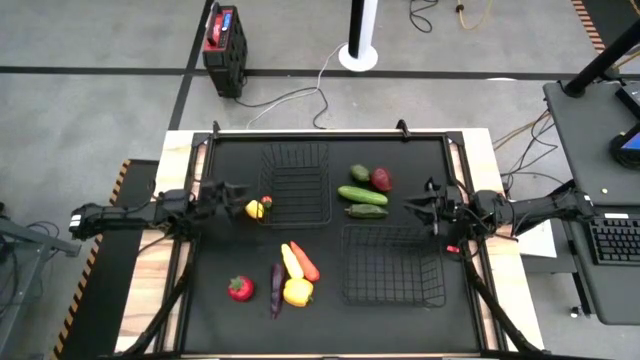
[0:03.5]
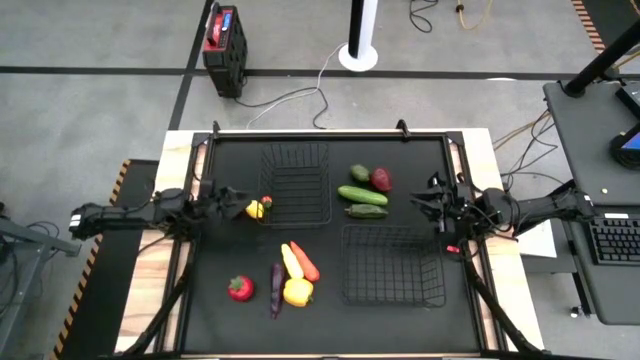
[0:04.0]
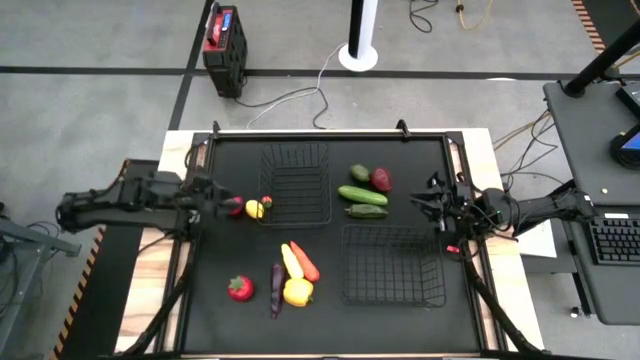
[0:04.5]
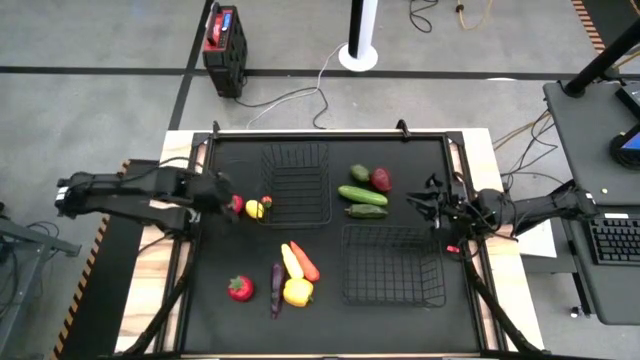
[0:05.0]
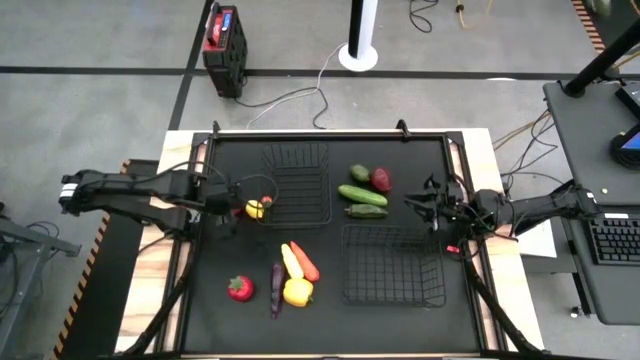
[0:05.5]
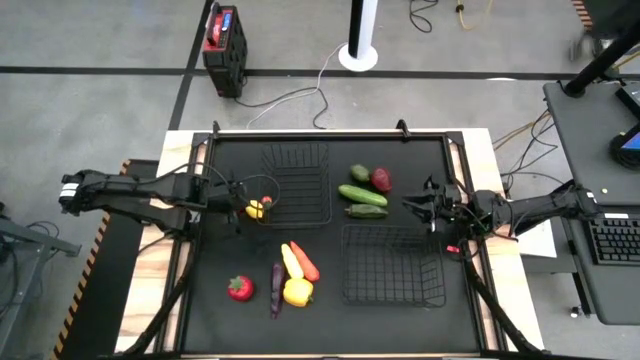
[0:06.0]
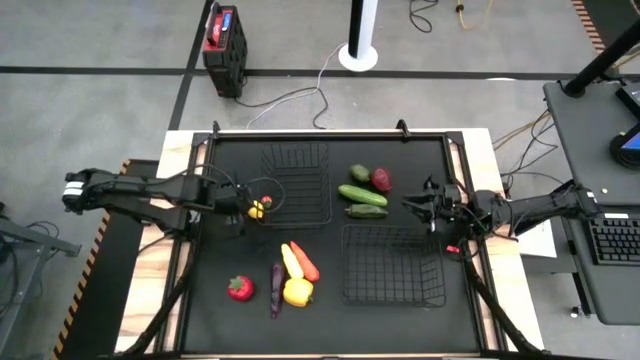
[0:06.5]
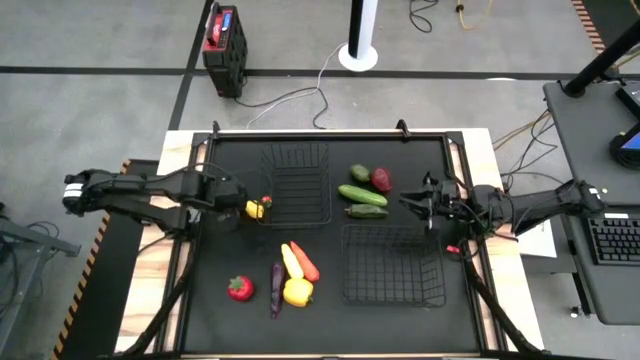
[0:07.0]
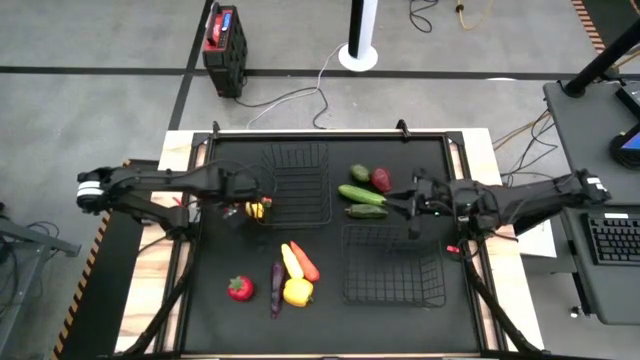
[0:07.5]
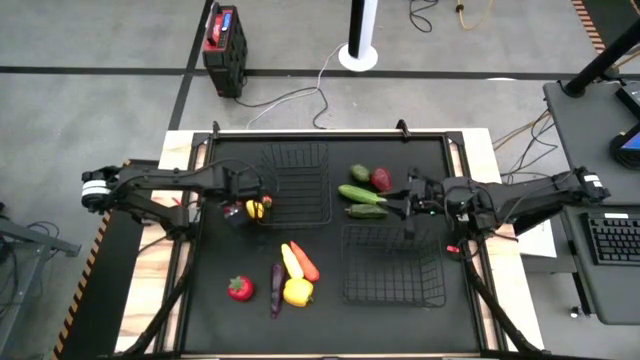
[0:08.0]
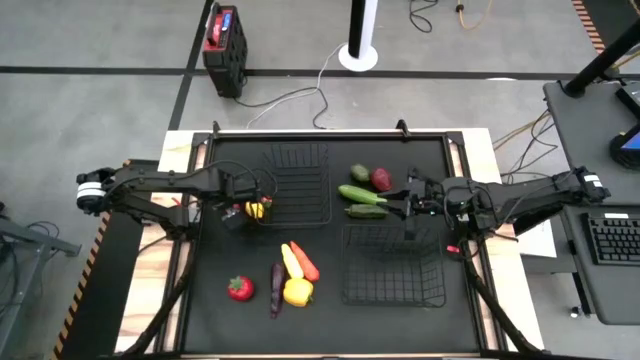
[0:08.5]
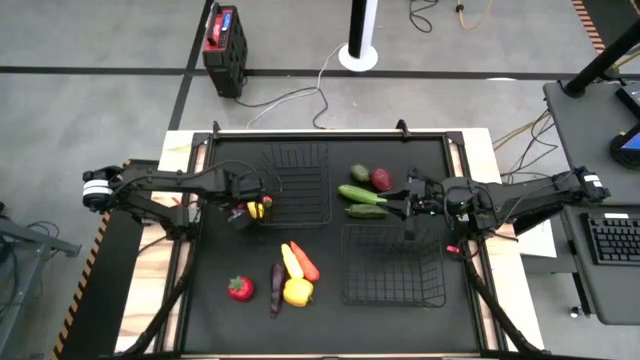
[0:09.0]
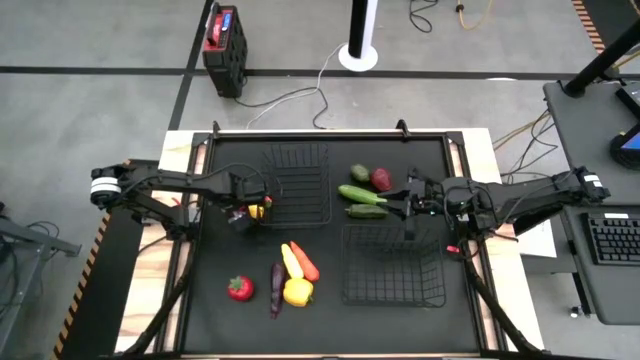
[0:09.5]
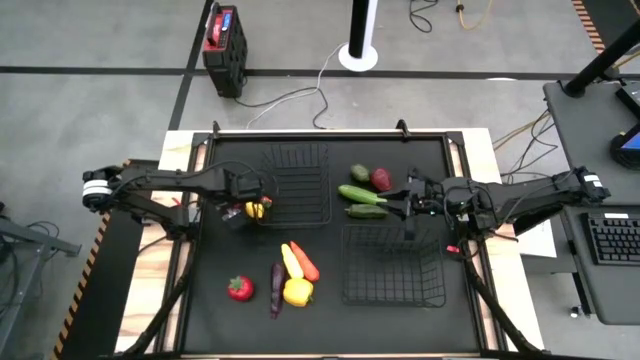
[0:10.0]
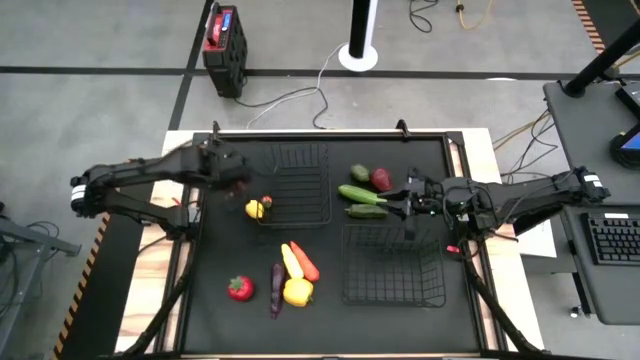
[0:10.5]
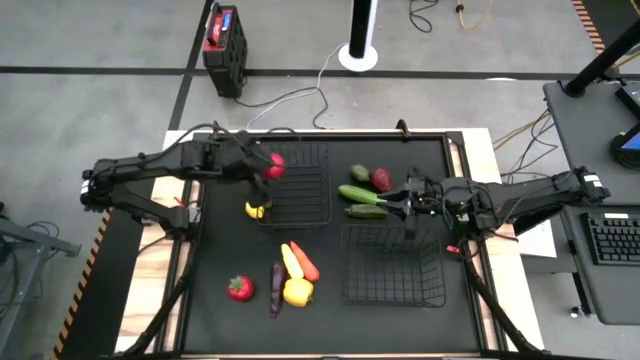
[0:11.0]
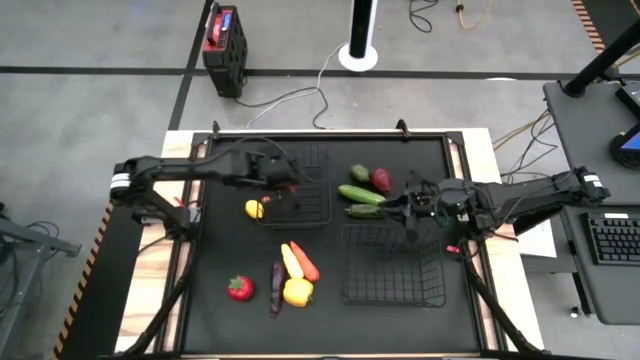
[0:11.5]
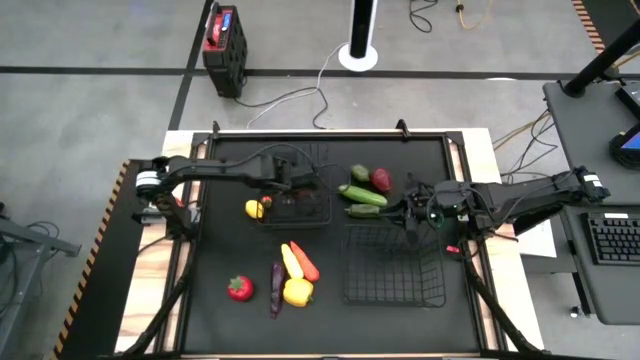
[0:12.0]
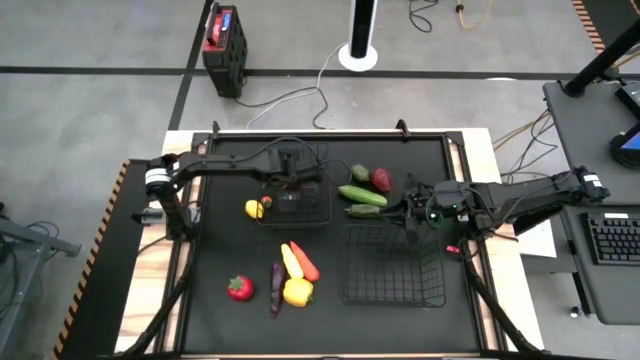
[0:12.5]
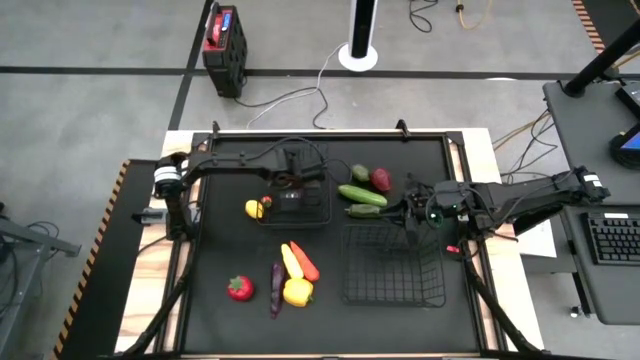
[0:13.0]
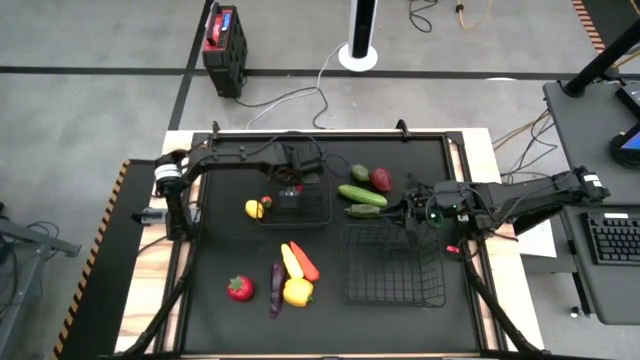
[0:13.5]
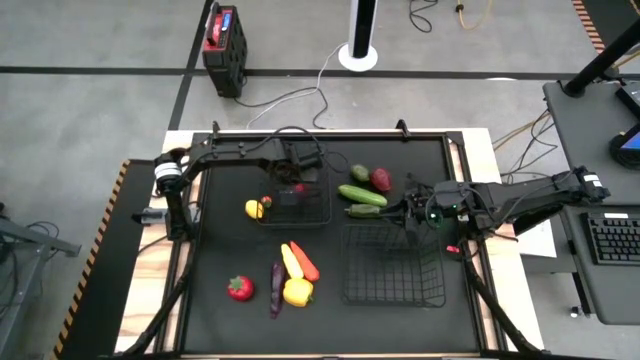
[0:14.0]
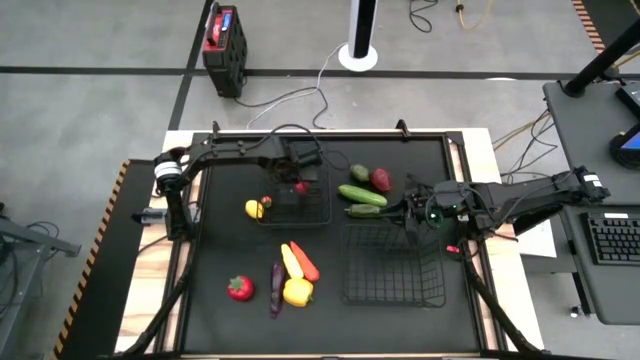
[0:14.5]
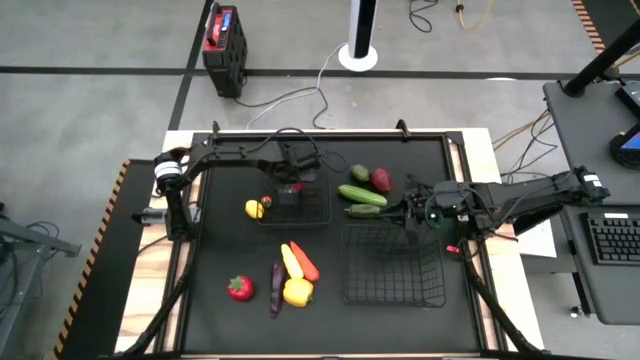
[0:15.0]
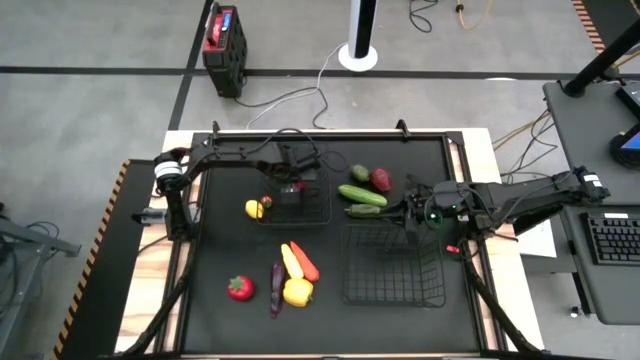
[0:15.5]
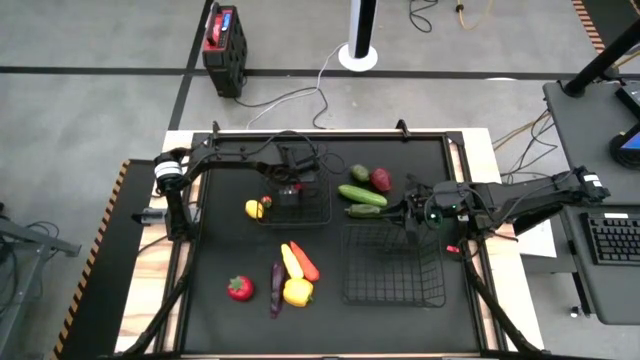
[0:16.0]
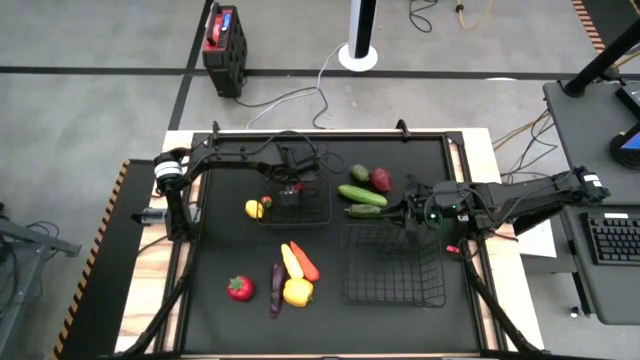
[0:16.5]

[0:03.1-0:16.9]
Task: Sort produce into baskets
Put the tomato into the top black wire basket

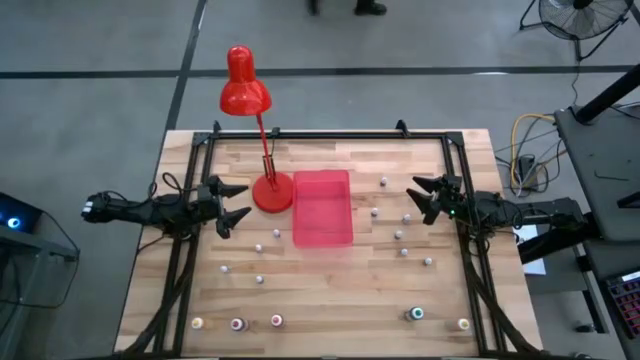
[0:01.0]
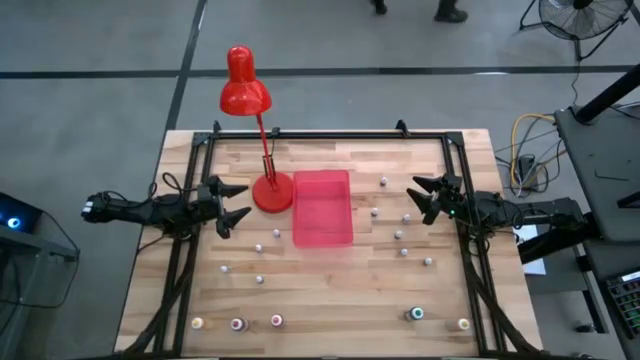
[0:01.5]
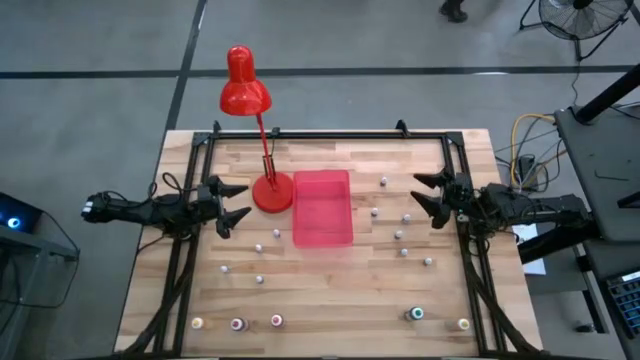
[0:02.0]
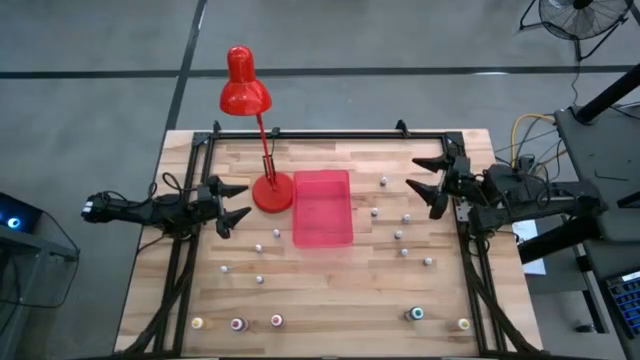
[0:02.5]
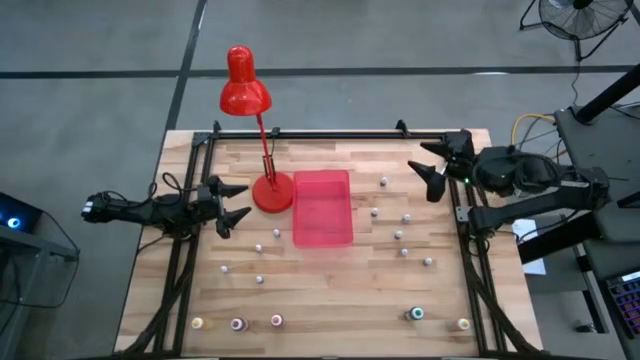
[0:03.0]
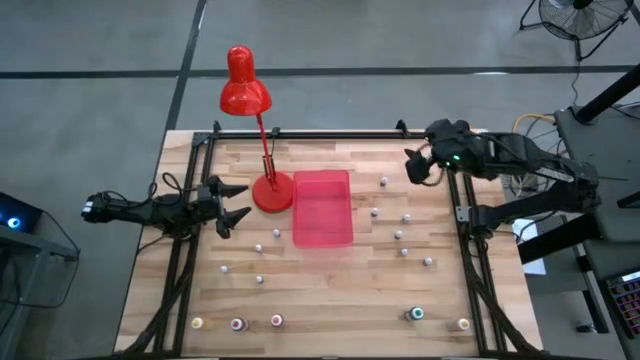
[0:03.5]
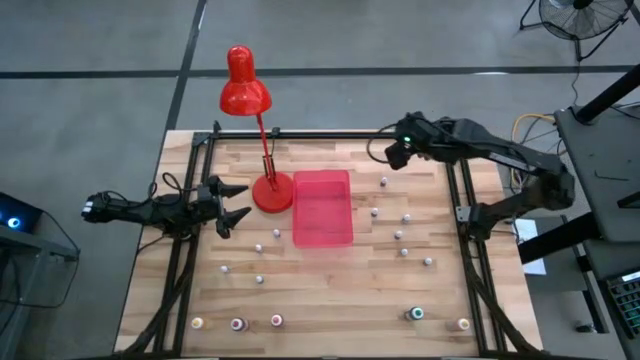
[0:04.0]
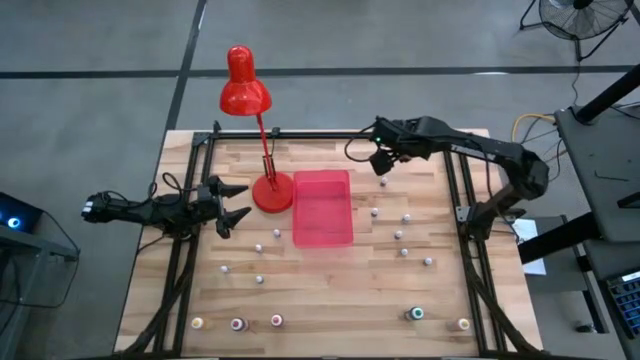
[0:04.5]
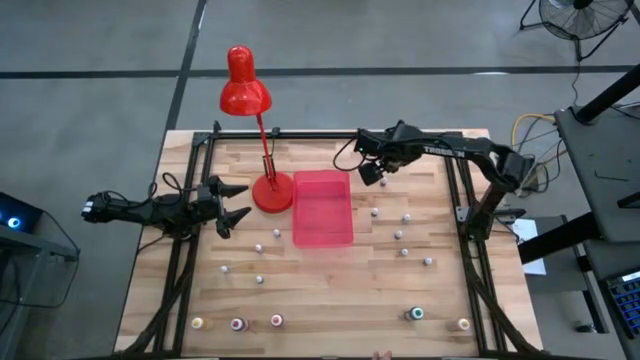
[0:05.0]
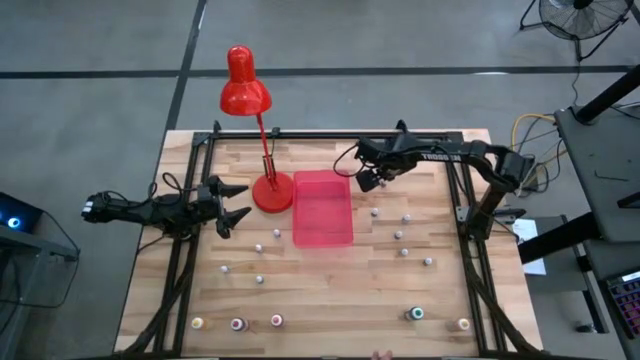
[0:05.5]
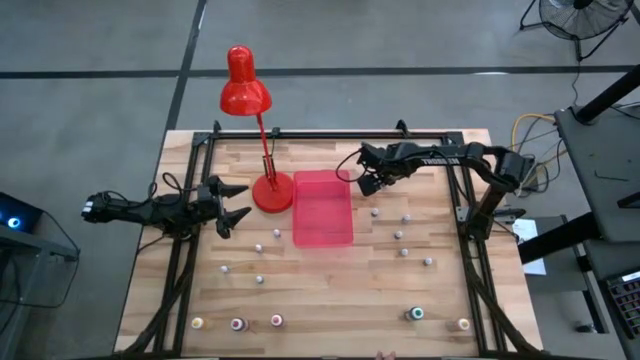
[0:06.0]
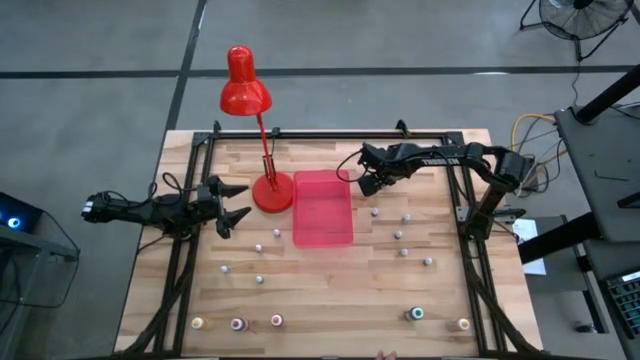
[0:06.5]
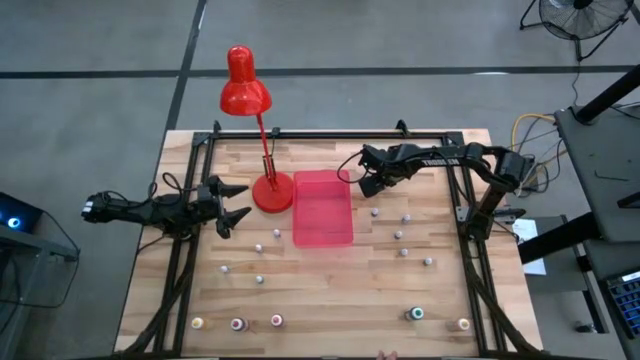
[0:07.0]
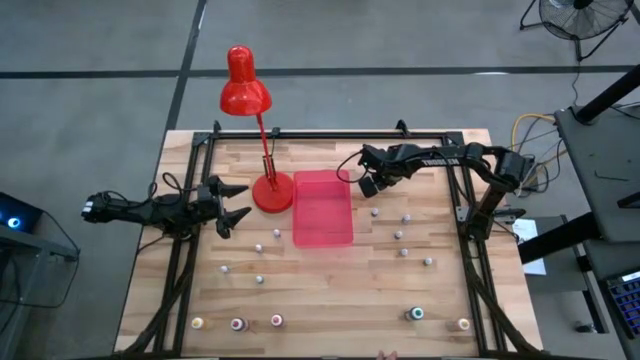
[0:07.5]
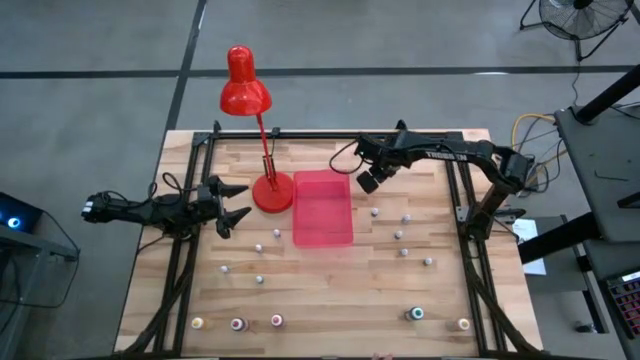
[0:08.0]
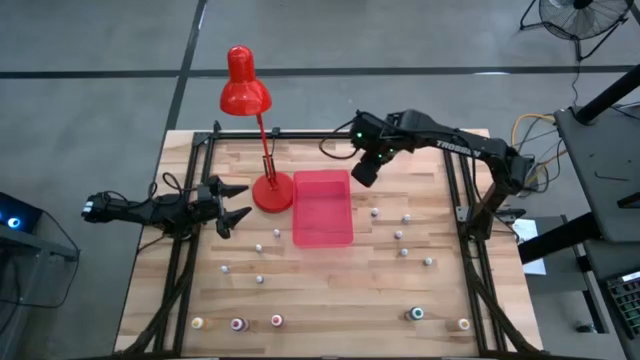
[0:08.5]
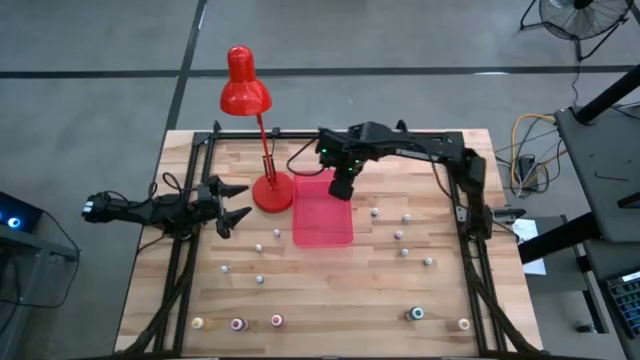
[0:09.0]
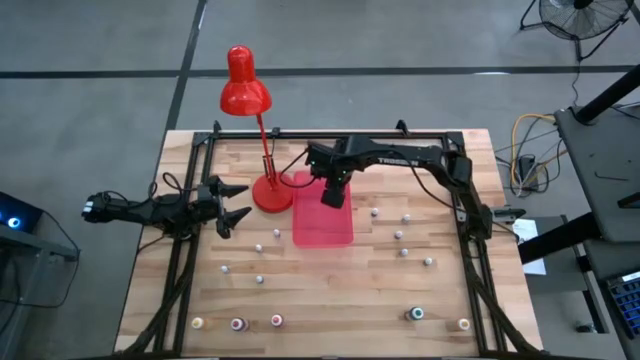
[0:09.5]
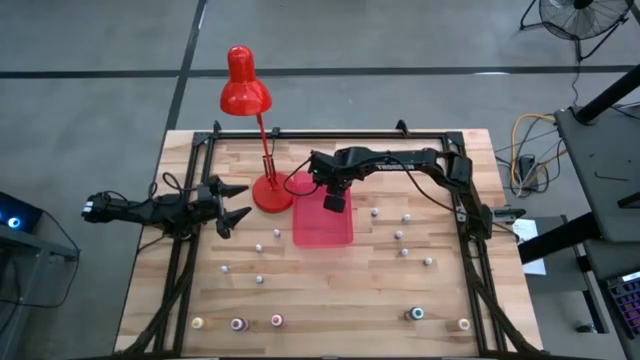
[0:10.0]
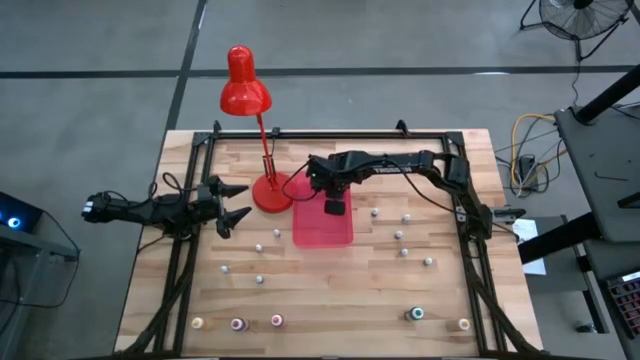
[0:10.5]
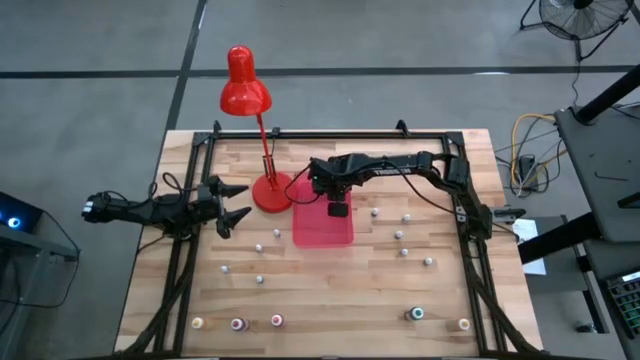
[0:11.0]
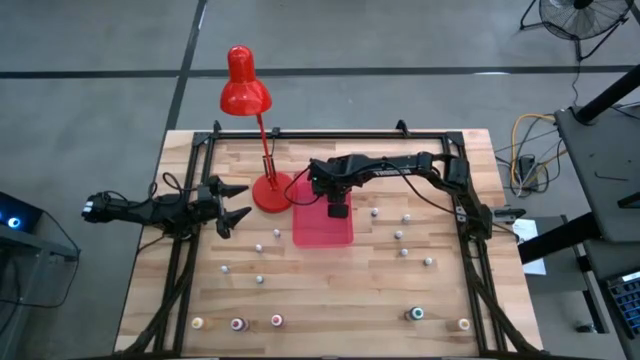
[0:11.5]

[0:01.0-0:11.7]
Task: Pick & Place food coloring
Put the small red food coloring bottle into the bin
